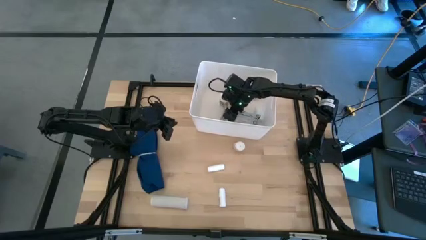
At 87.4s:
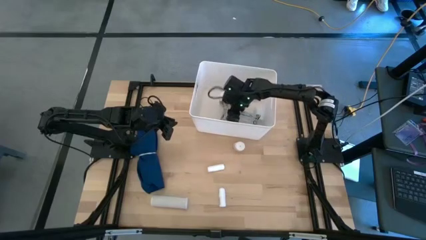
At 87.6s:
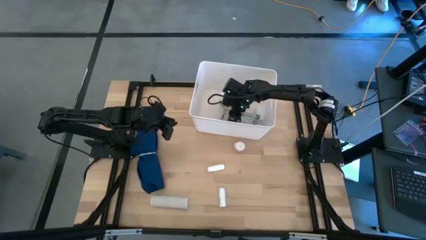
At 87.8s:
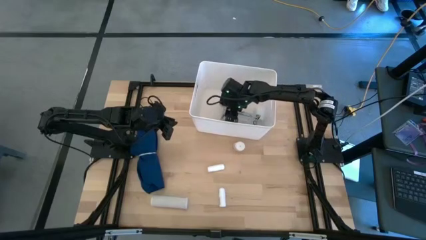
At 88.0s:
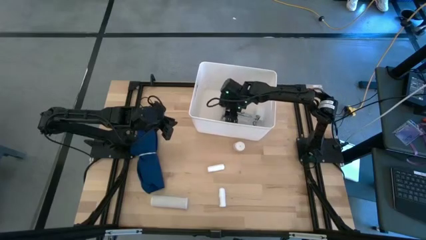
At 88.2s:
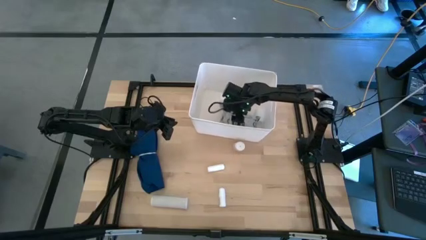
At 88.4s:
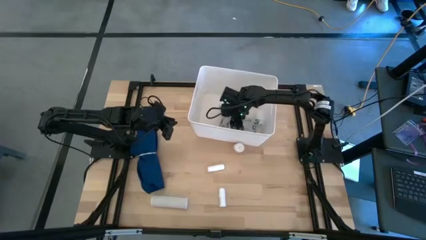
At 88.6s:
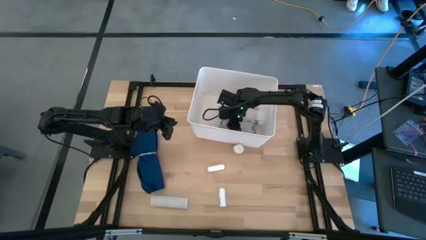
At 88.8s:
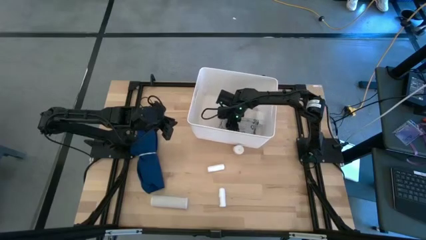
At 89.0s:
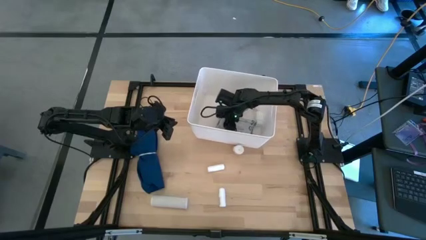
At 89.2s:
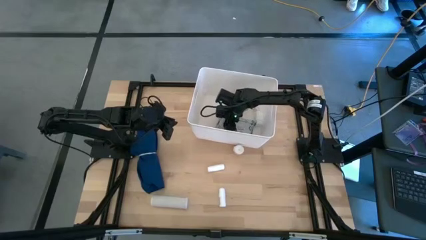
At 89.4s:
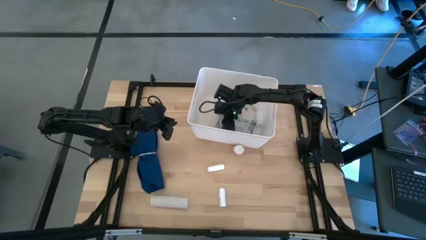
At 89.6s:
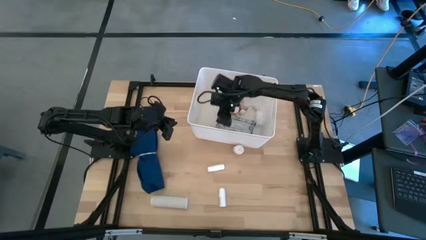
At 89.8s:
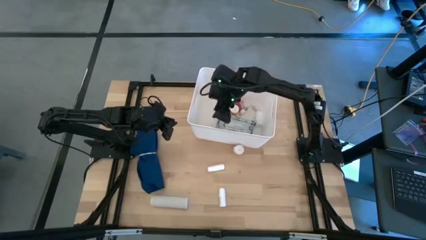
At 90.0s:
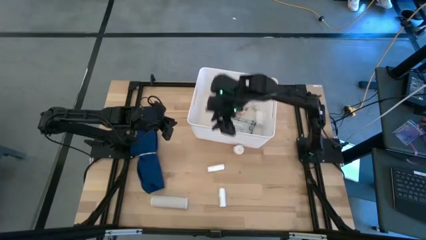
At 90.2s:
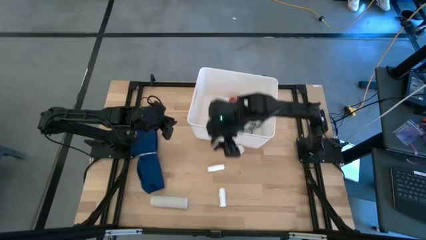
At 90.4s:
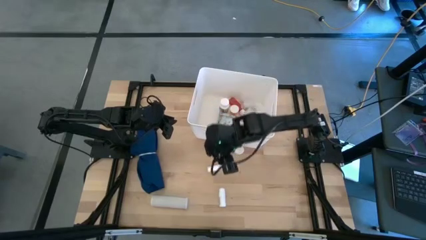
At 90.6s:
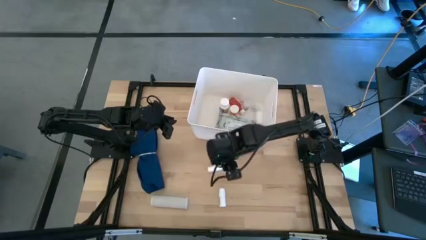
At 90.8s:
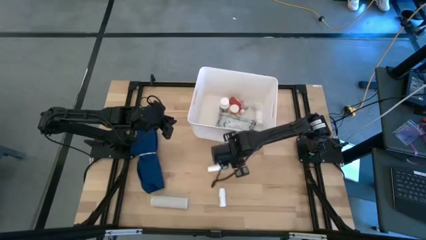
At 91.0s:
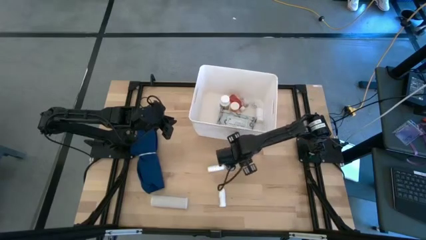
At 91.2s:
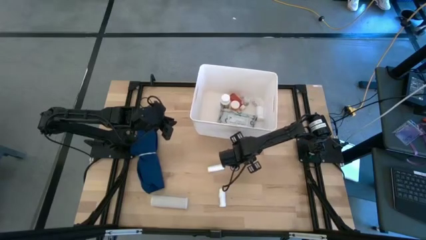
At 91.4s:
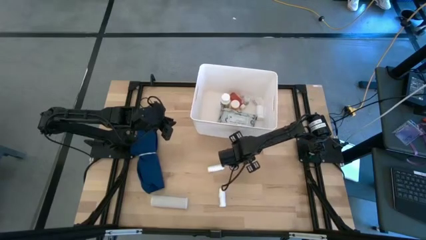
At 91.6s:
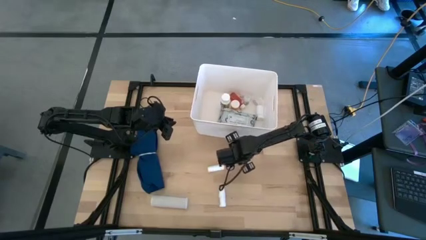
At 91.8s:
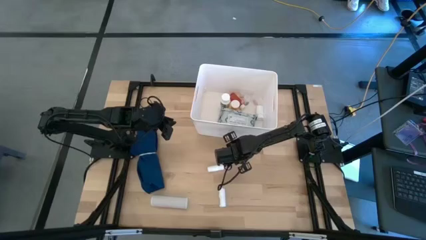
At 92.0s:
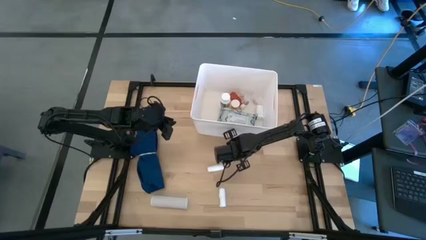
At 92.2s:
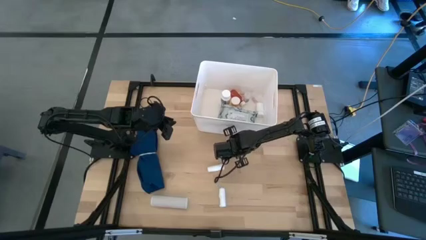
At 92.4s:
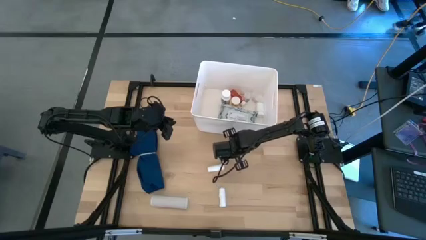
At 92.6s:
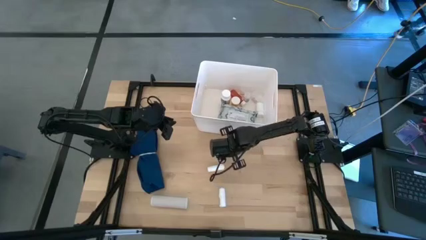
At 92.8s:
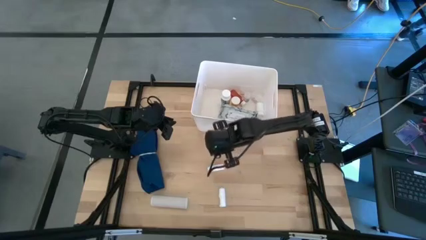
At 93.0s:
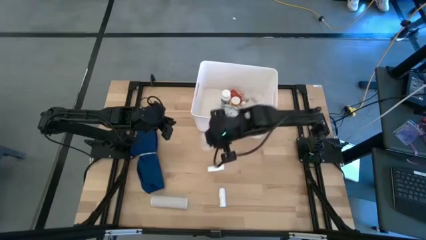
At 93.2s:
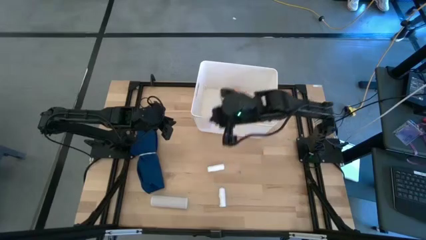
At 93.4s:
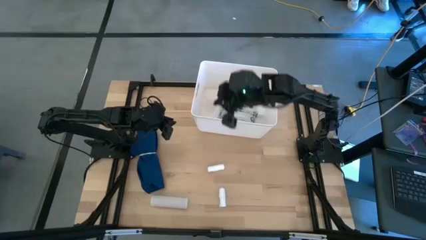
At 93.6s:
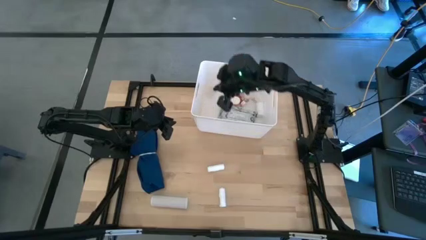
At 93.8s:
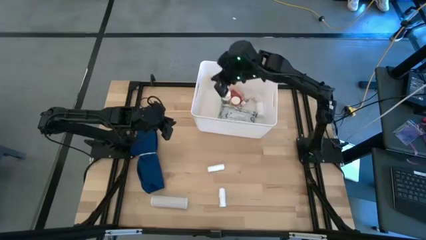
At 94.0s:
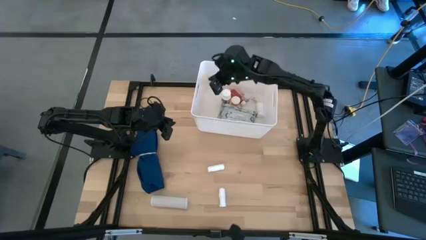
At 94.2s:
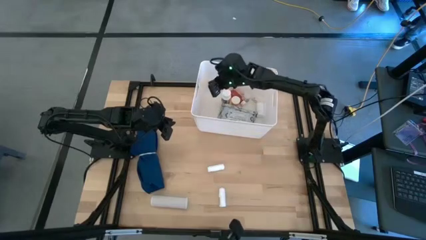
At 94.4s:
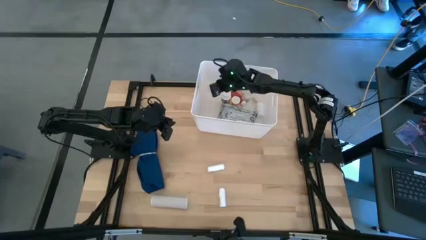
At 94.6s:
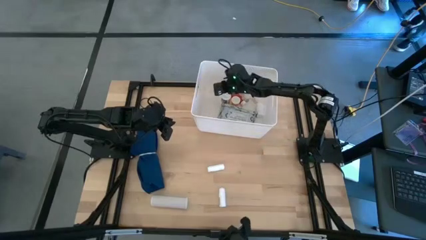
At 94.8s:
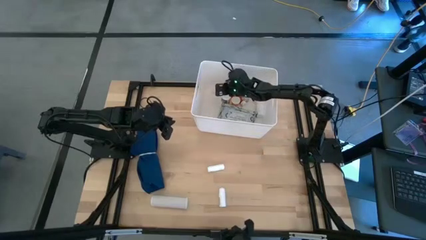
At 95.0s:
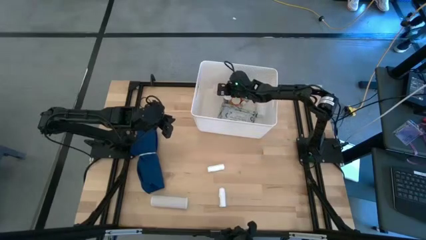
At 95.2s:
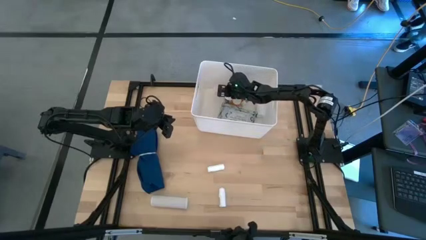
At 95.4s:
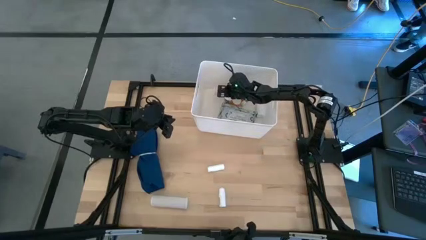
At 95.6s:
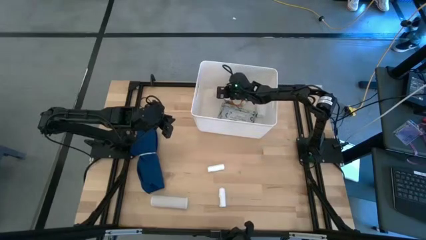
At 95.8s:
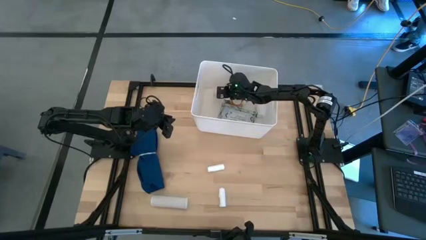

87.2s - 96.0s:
Task: Pick & place medical supplies in basket/bin
Put the top bandage in the white bin

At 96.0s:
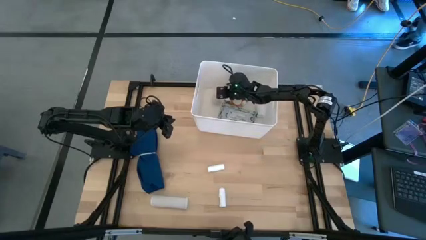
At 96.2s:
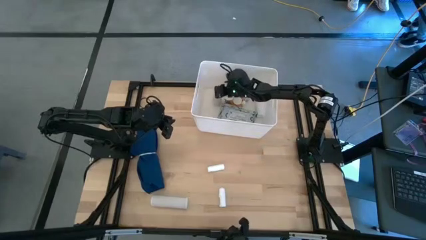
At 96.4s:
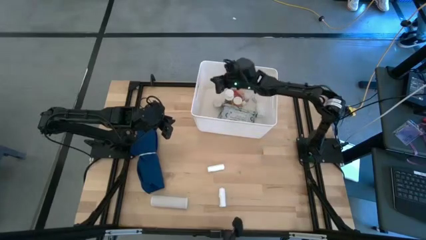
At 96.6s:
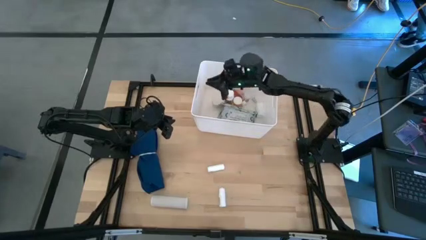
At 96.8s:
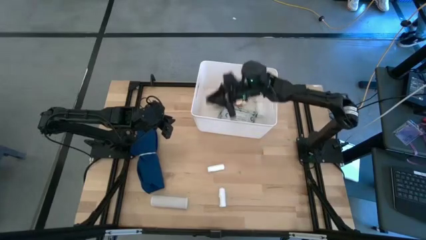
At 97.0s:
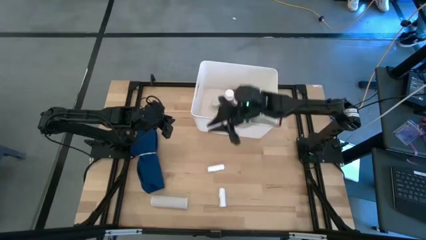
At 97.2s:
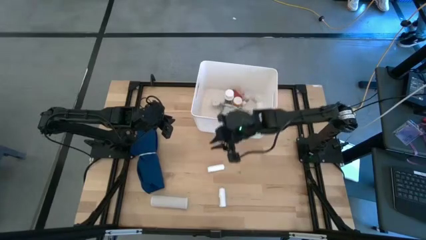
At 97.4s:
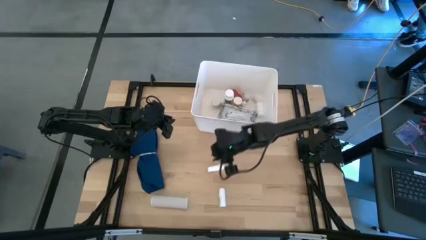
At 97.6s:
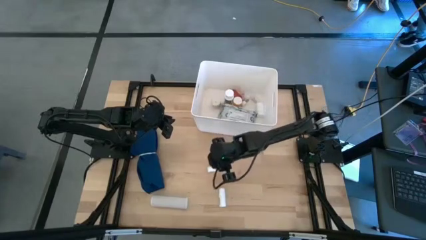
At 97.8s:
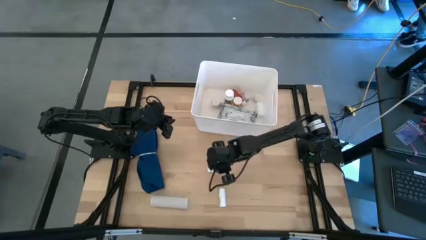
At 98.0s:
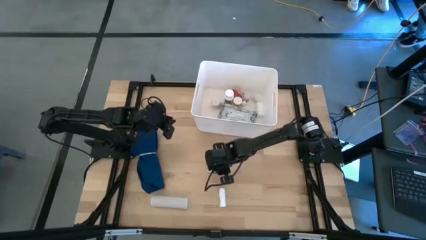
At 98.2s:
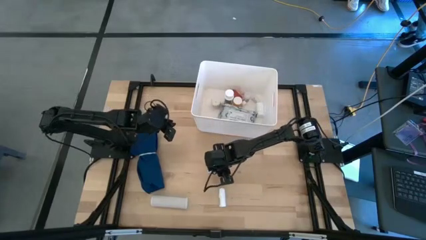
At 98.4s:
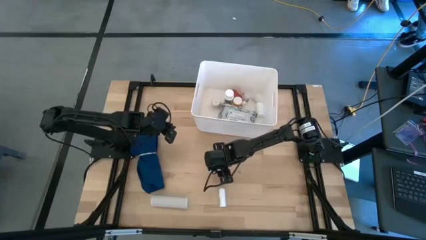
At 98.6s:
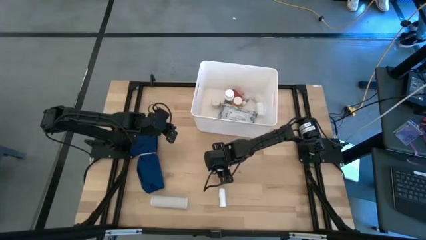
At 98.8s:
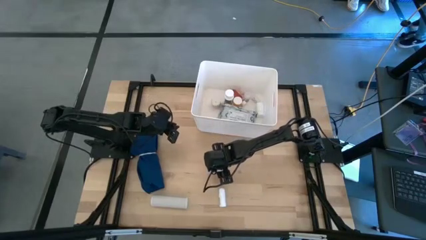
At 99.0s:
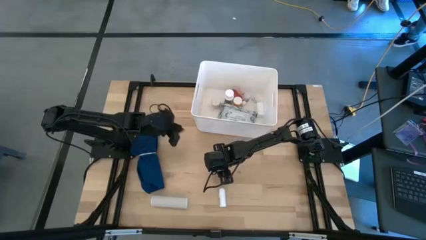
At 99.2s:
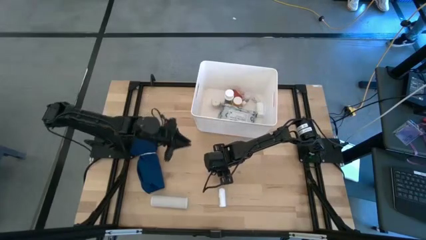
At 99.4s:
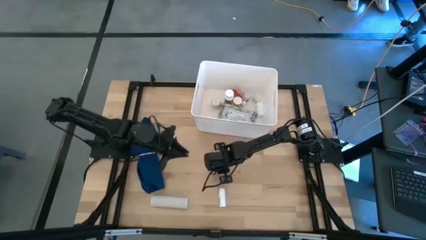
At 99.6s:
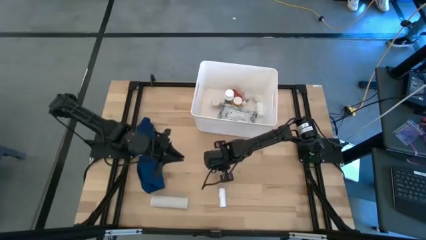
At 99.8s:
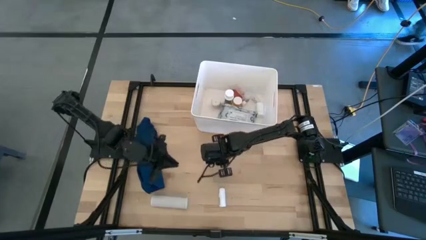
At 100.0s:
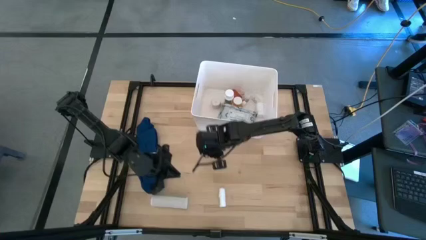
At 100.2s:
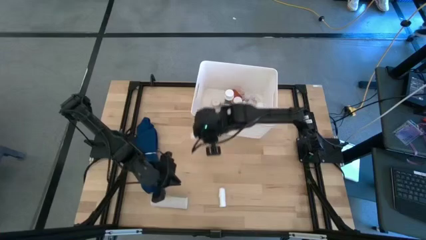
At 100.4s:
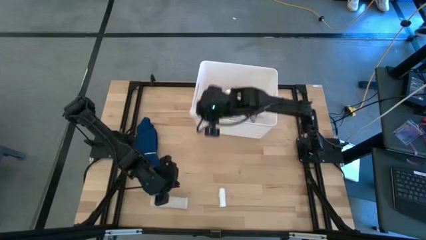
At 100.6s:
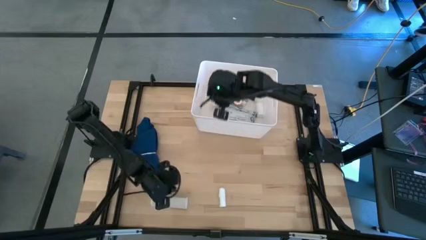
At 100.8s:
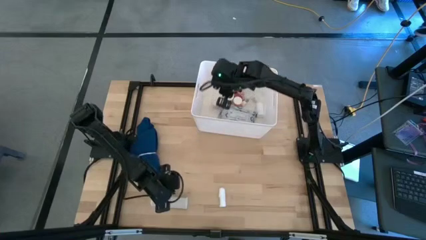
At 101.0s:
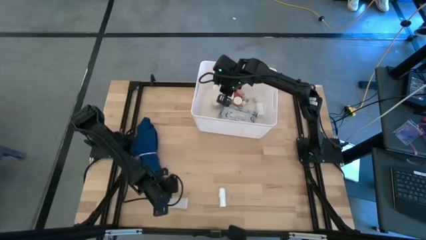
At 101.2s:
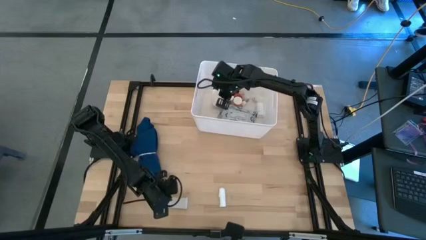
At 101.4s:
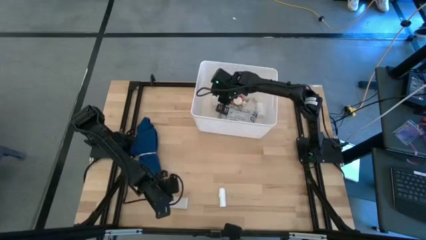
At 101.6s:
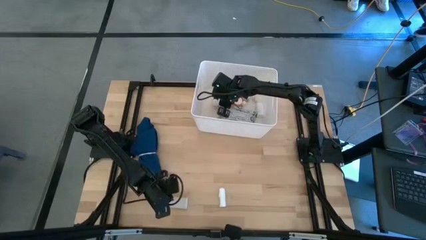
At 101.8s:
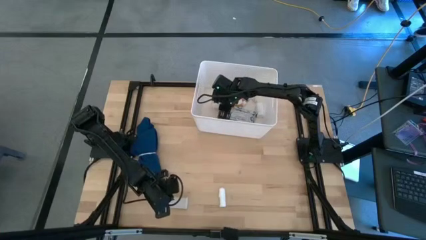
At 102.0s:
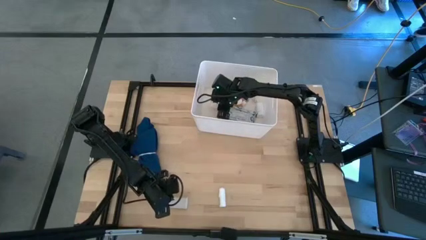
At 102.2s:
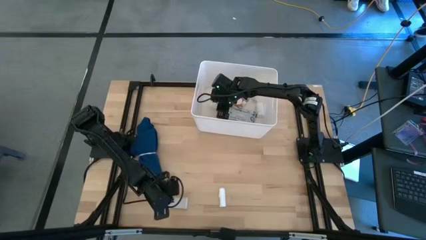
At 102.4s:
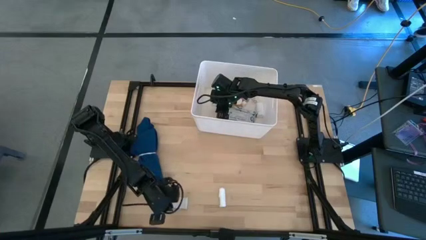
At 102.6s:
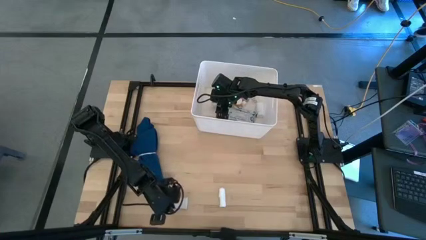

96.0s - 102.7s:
Put the top rolled gauze in the white bin

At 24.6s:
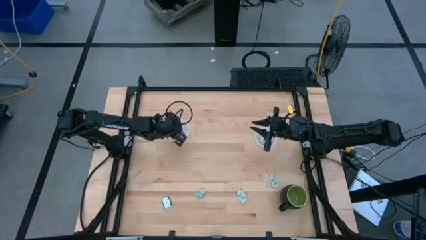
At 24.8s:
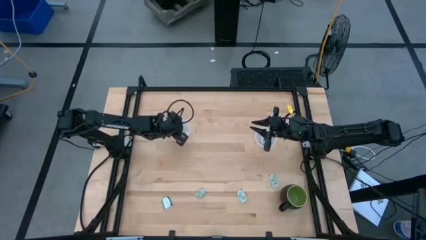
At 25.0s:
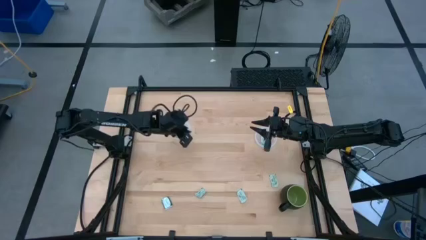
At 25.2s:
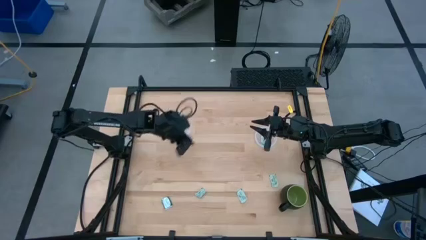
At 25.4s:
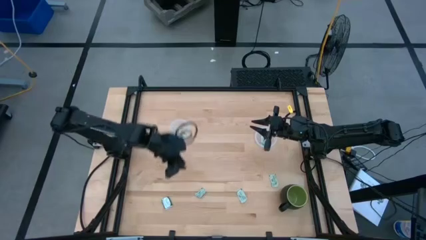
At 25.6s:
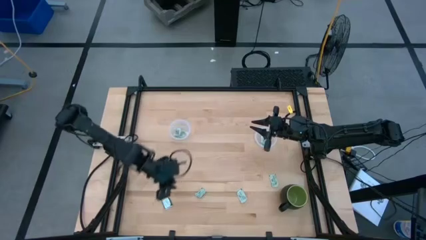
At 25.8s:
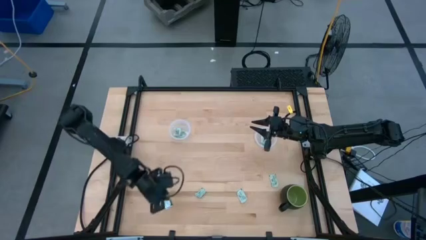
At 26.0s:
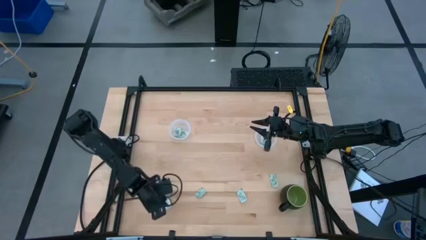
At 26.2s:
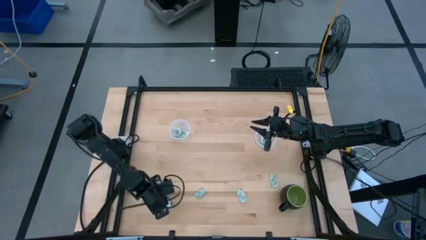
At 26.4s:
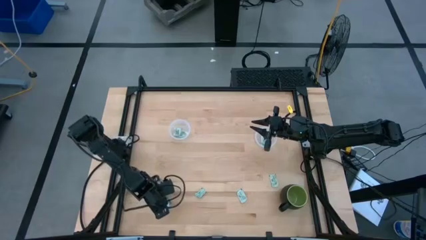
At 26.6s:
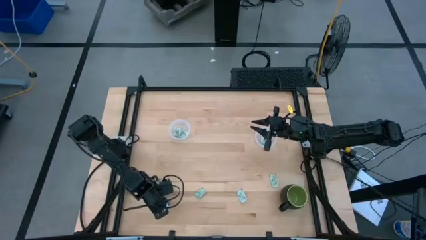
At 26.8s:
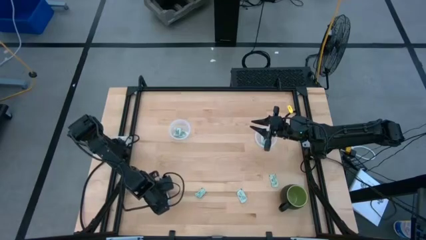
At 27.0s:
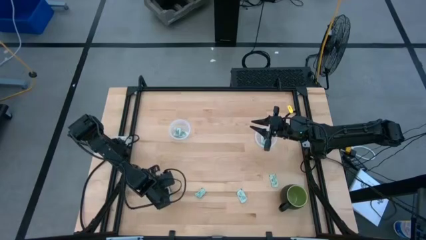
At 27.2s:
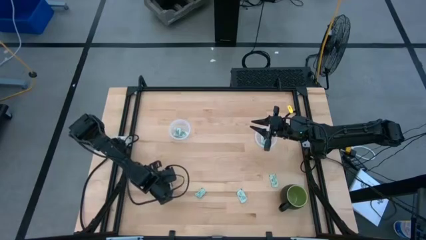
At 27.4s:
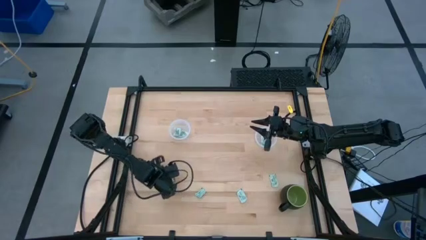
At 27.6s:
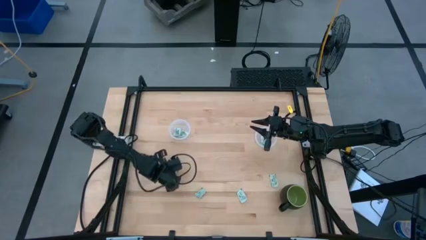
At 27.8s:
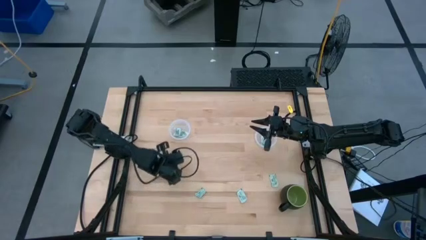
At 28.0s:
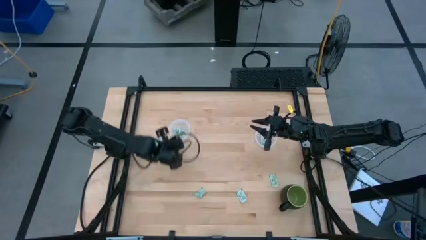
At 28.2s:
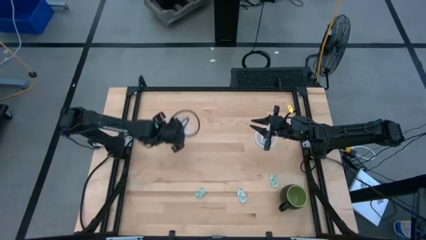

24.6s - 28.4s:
Task: Pick and place Stevia / Truvia into bins
Put the truvia packet into the left transparent container
